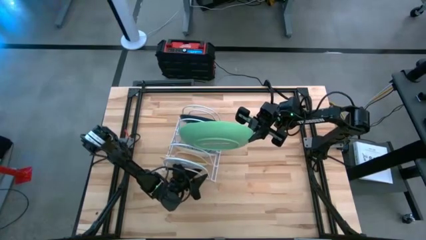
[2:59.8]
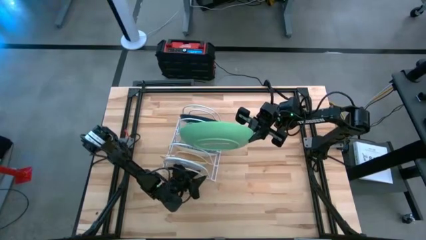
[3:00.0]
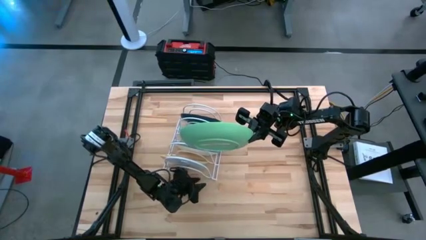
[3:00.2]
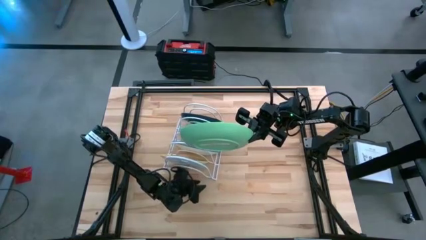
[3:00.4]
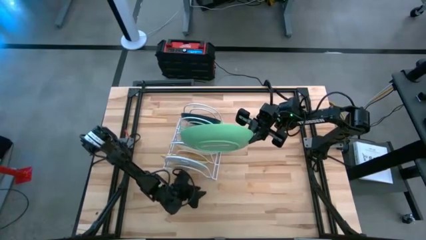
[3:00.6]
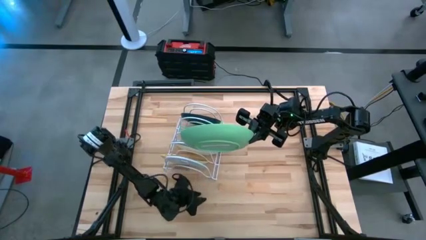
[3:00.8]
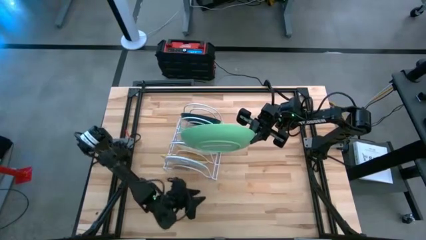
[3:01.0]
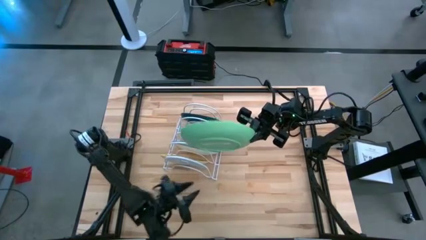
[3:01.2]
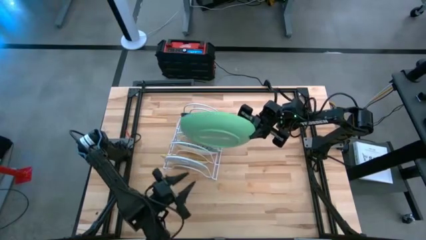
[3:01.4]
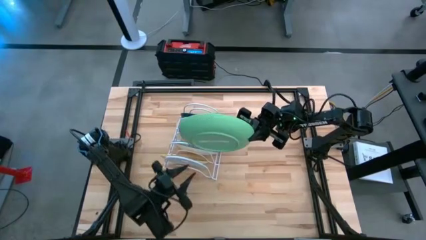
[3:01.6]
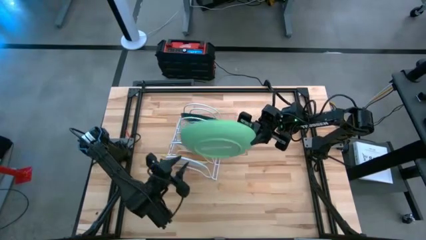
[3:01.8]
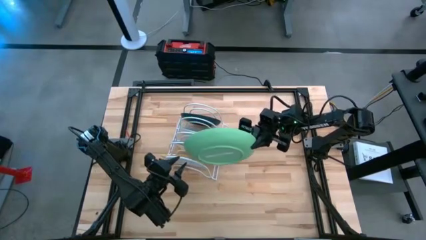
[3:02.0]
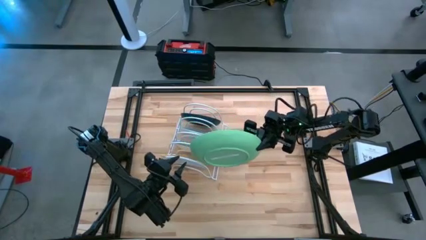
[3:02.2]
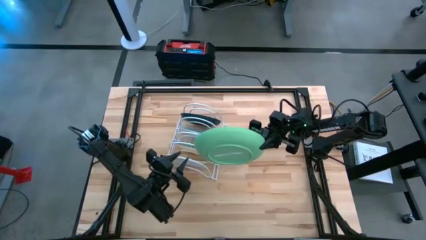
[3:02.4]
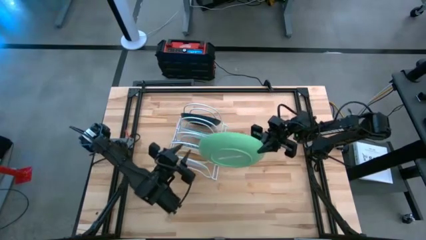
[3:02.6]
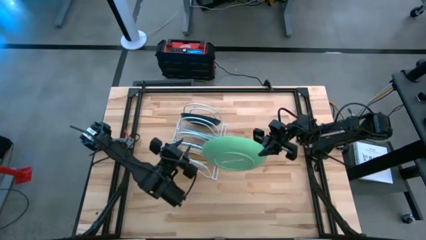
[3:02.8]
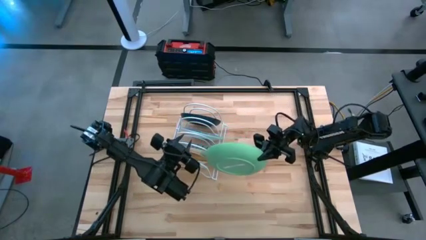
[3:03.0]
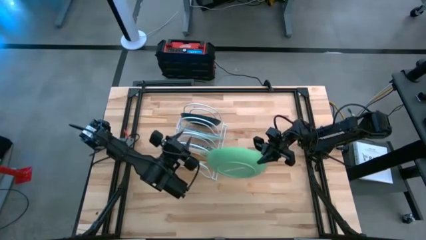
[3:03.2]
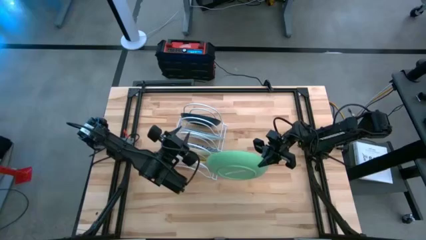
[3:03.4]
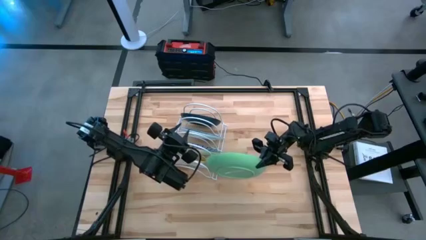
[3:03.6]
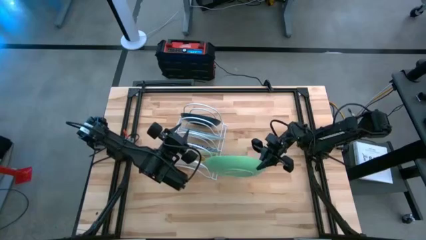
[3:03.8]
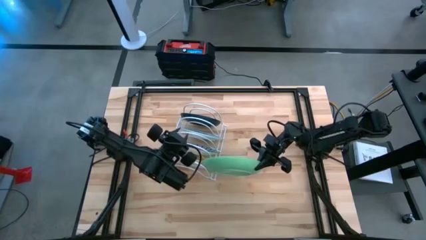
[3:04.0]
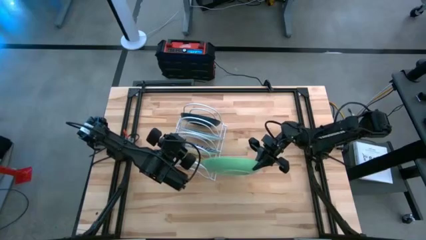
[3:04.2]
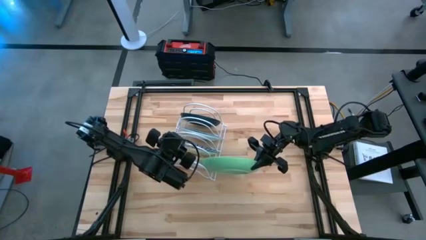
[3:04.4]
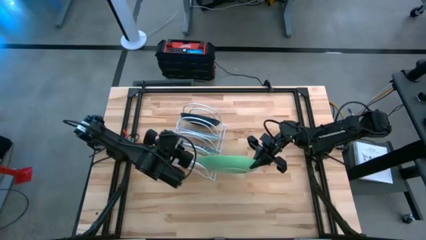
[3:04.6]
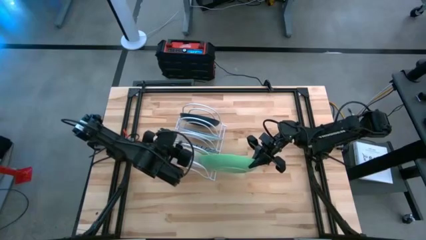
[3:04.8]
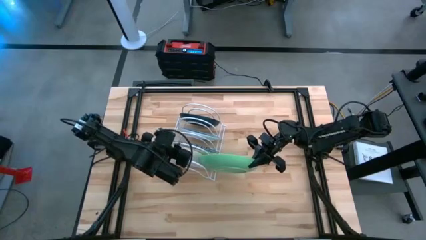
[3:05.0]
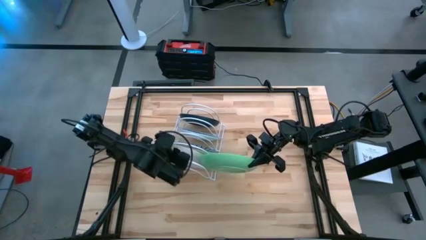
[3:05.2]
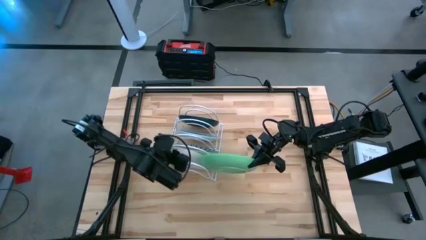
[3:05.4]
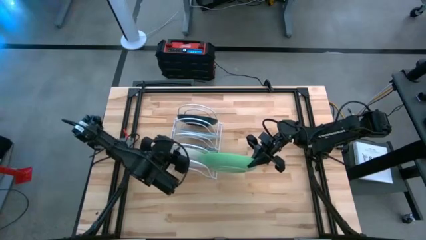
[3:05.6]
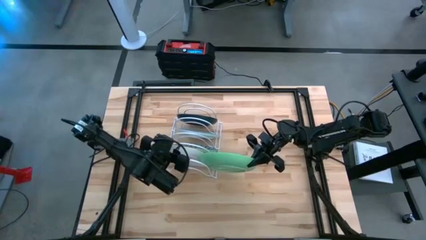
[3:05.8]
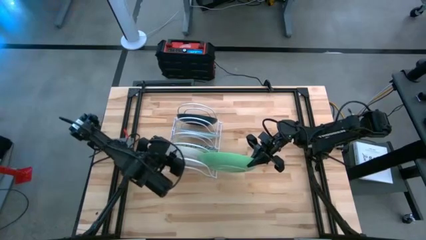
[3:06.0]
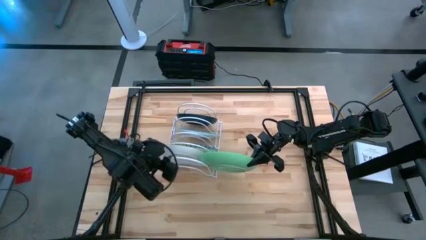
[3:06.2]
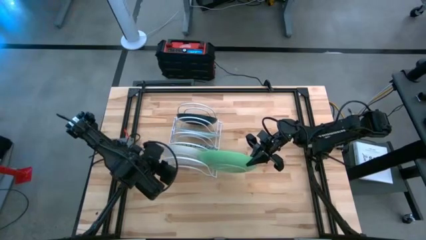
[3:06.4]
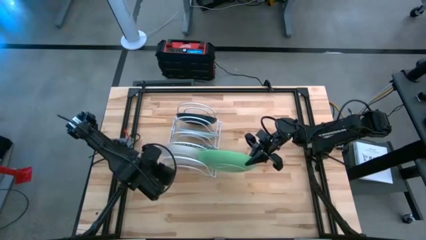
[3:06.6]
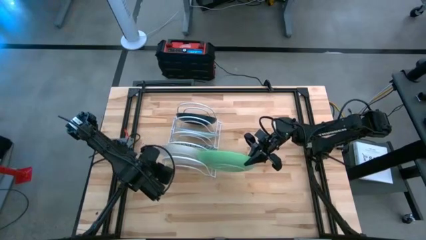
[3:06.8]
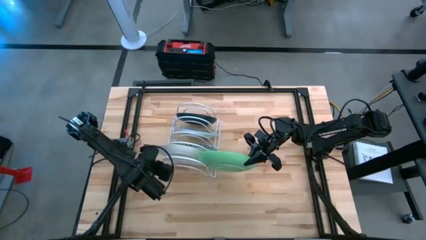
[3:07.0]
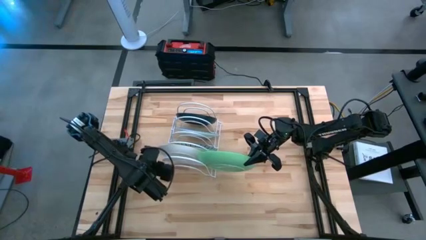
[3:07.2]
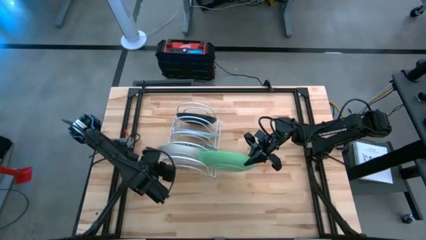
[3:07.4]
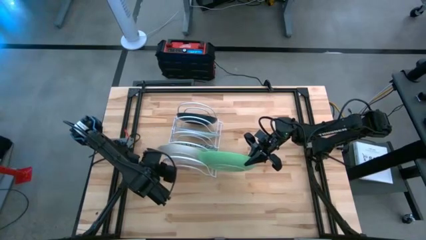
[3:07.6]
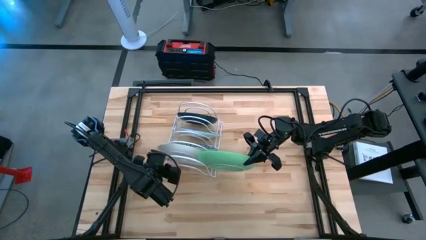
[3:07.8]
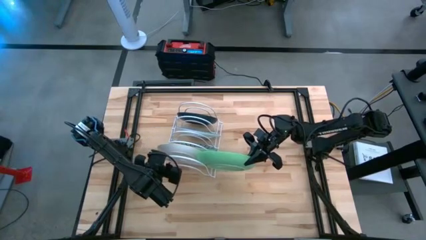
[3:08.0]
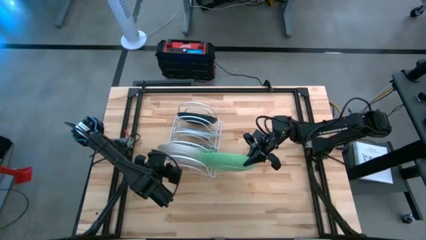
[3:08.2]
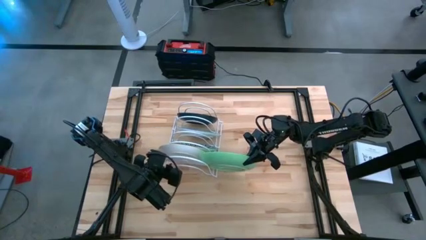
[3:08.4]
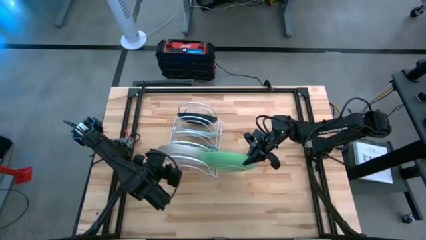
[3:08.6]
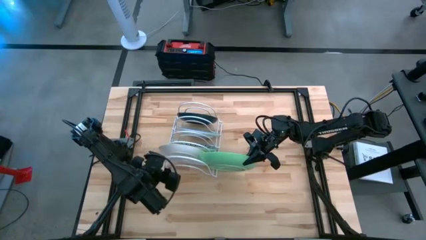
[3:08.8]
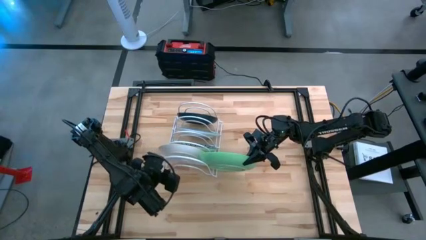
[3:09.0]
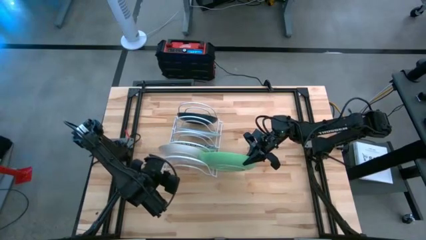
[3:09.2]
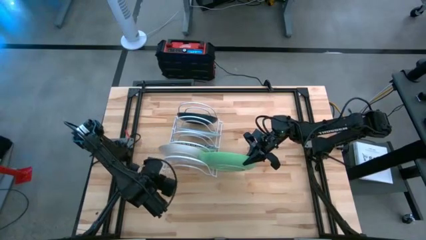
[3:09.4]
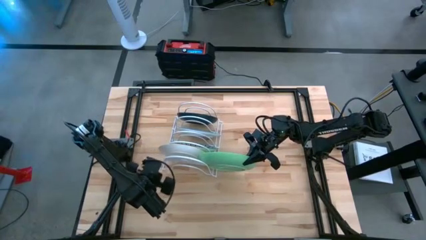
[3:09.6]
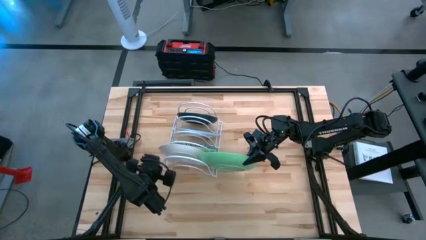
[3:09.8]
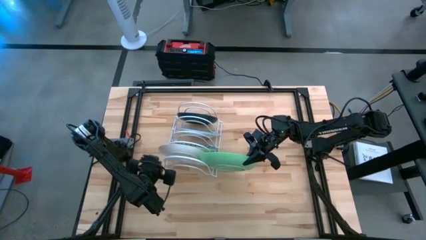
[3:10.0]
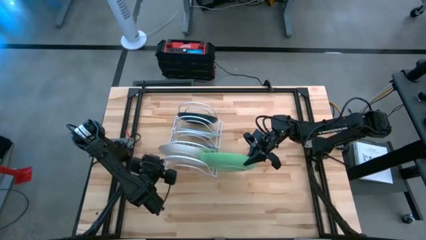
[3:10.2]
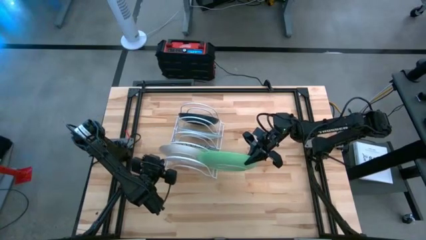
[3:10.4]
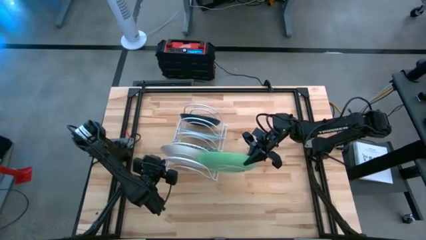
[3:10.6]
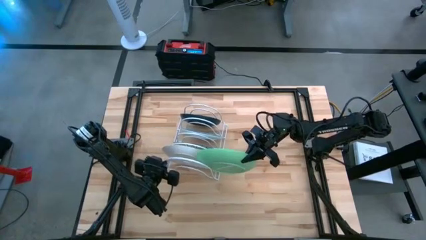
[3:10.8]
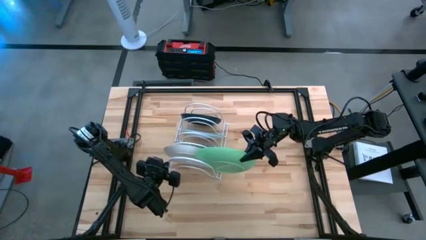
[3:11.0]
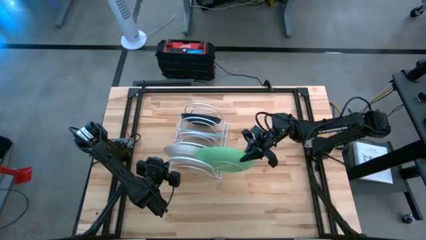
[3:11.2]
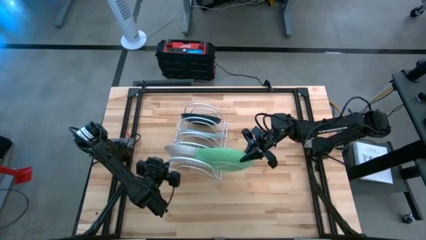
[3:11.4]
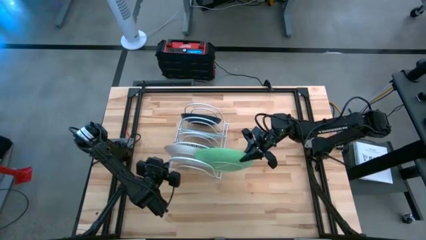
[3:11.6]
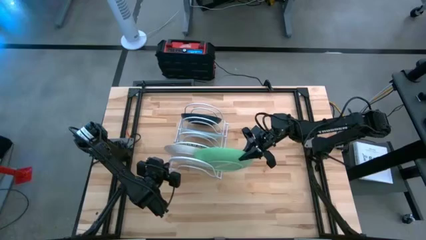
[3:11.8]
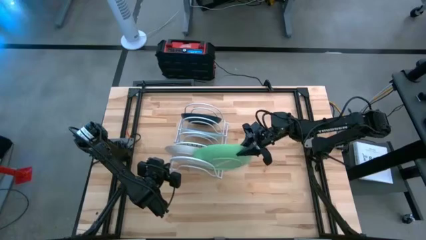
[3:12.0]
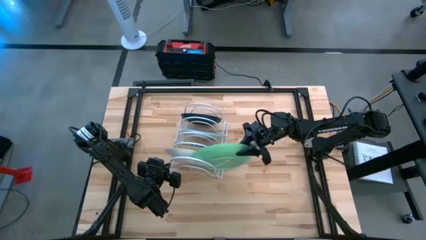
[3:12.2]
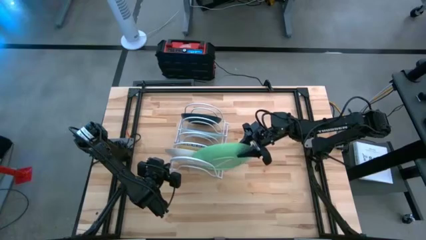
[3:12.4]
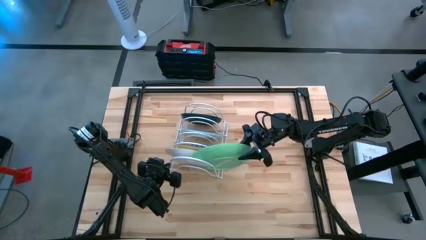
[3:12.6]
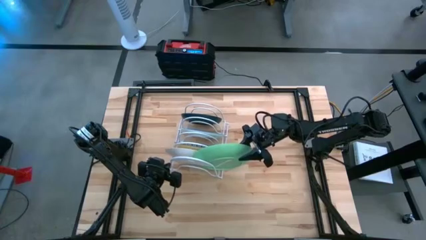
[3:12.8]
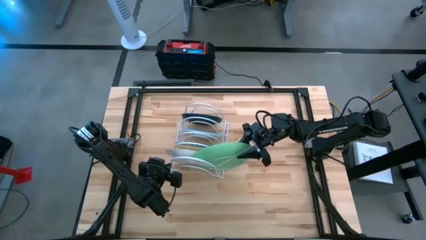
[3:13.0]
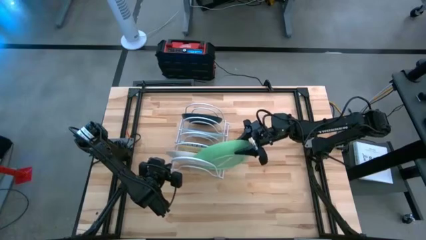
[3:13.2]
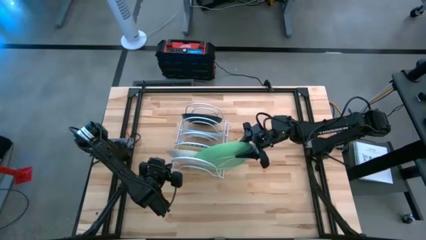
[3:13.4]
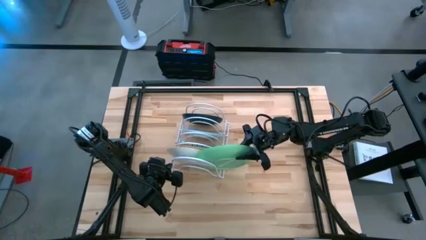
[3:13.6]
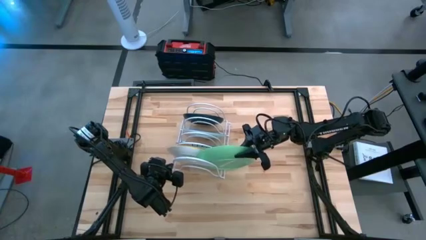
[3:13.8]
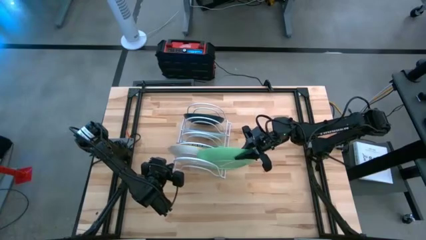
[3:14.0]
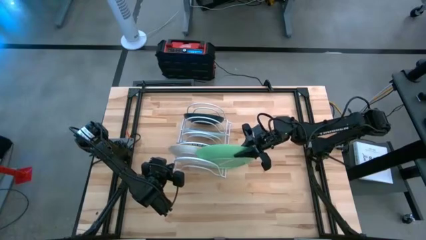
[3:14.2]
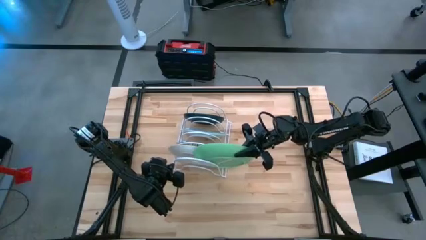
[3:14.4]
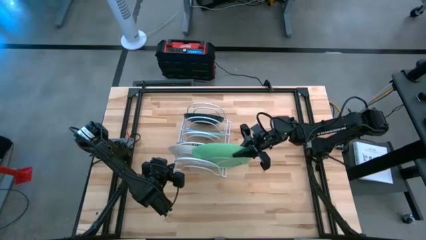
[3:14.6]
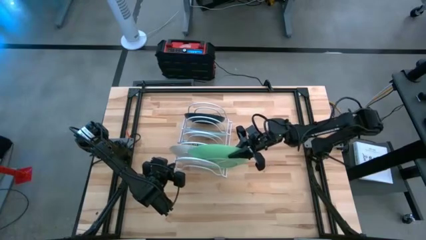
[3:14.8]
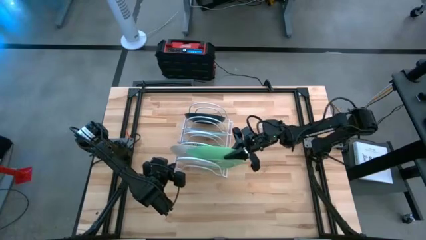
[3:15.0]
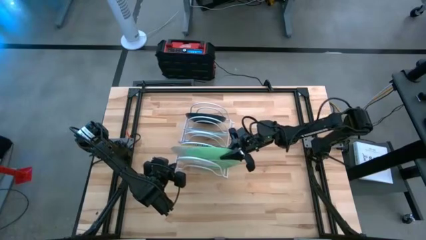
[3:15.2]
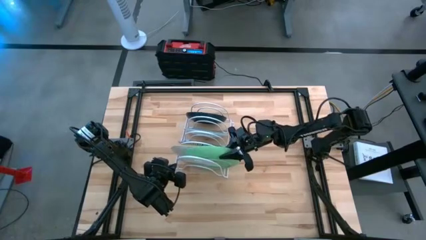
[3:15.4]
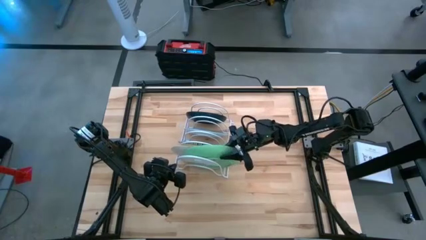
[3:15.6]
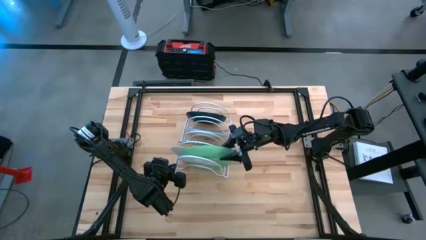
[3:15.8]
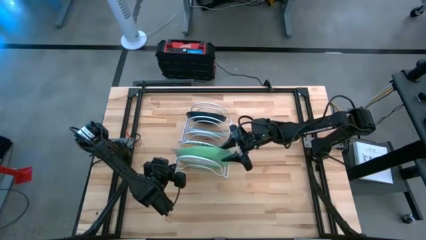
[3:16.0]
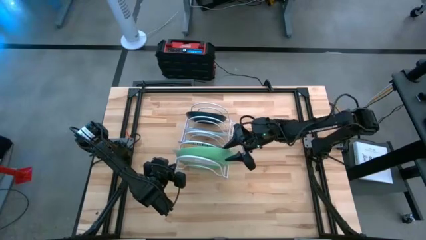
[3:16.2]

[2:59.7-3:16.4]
Task: Sort dishes
Put the green plate in the dish rack
